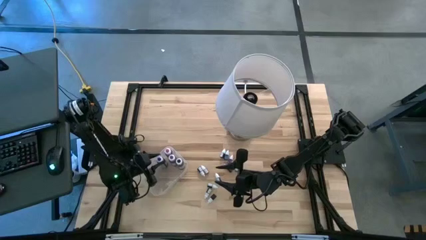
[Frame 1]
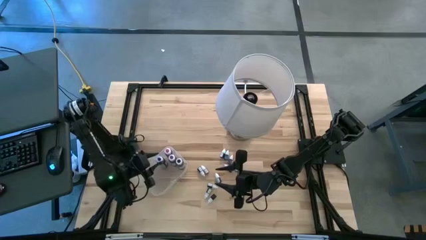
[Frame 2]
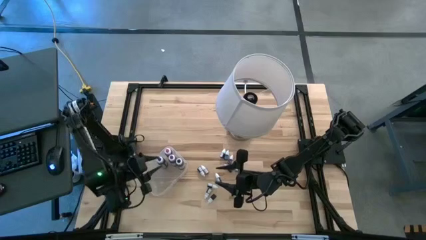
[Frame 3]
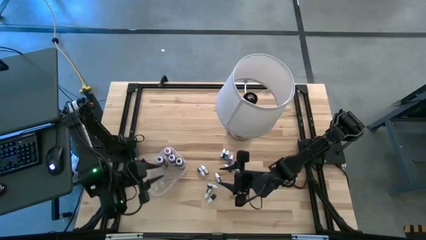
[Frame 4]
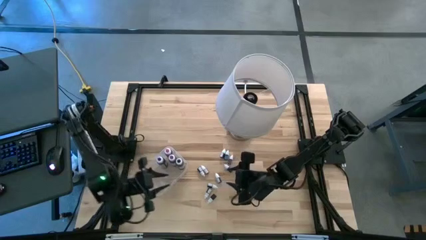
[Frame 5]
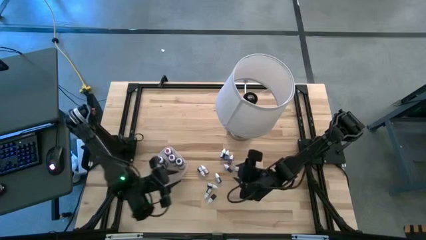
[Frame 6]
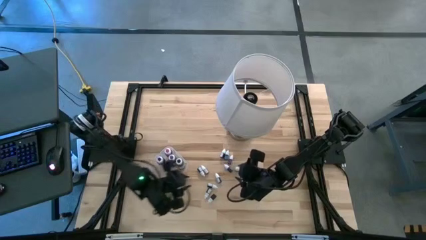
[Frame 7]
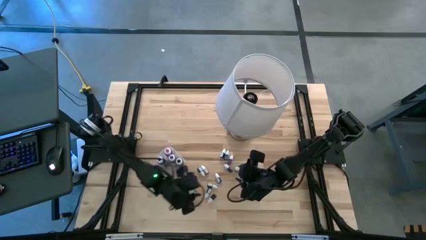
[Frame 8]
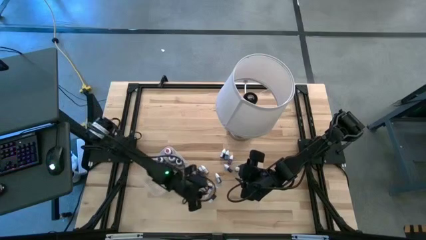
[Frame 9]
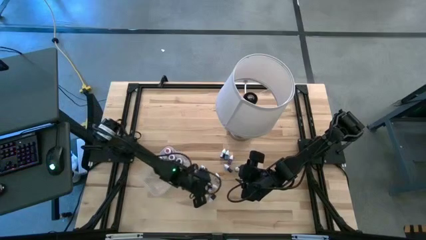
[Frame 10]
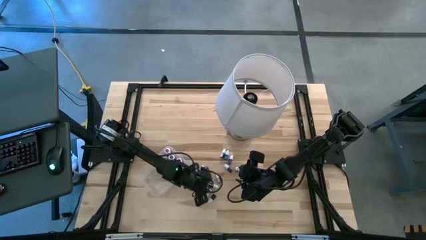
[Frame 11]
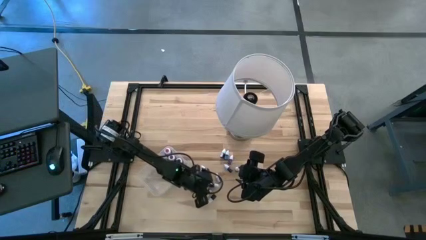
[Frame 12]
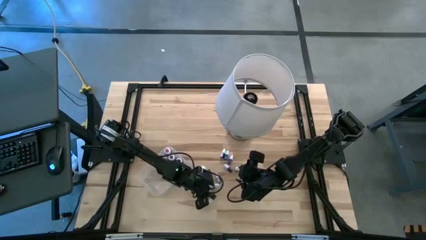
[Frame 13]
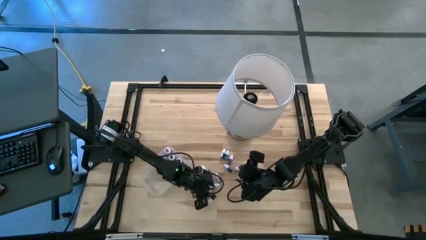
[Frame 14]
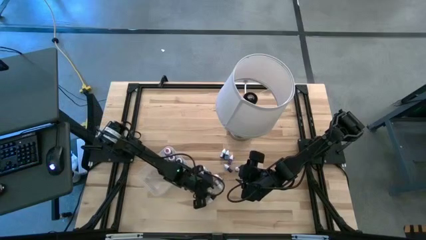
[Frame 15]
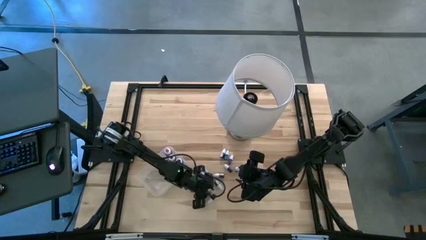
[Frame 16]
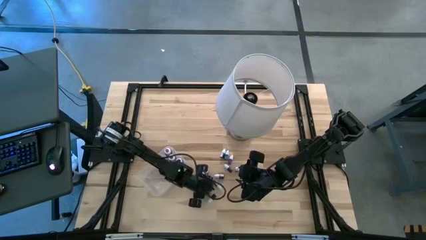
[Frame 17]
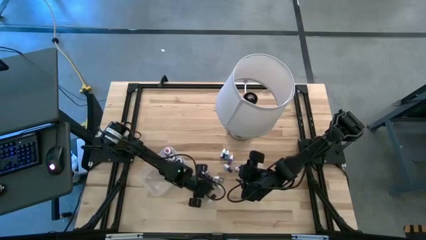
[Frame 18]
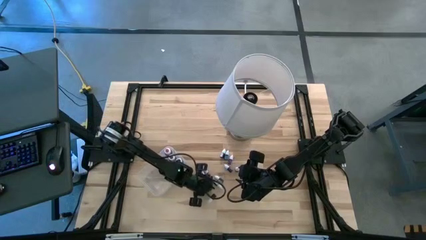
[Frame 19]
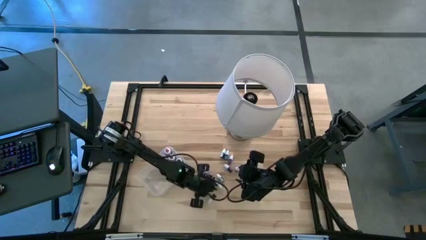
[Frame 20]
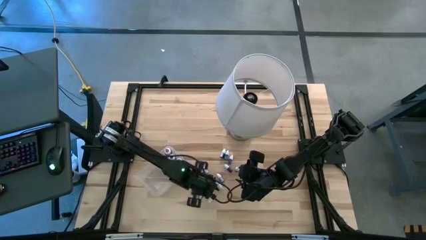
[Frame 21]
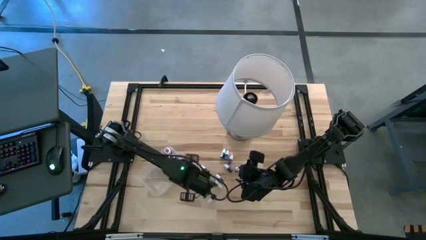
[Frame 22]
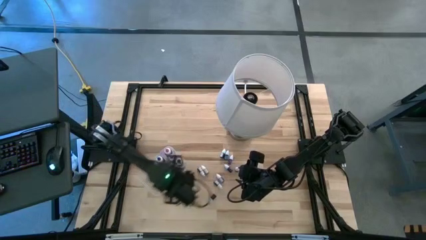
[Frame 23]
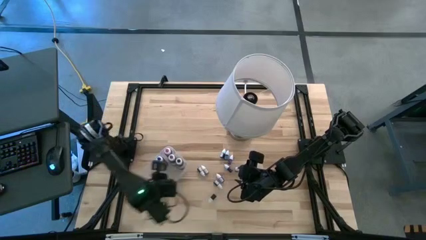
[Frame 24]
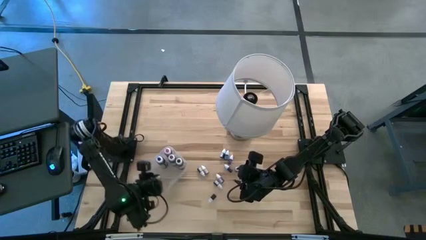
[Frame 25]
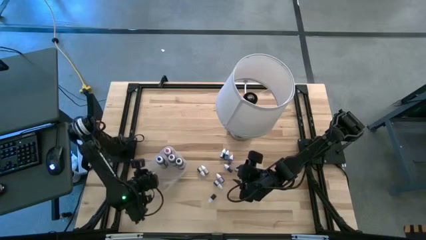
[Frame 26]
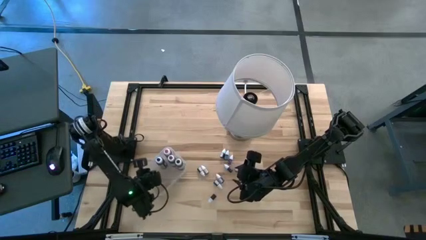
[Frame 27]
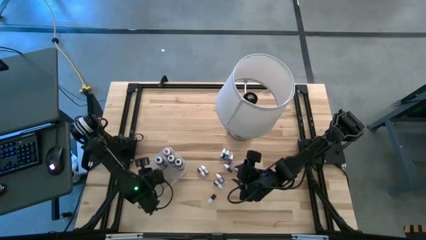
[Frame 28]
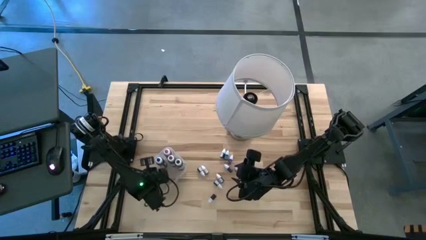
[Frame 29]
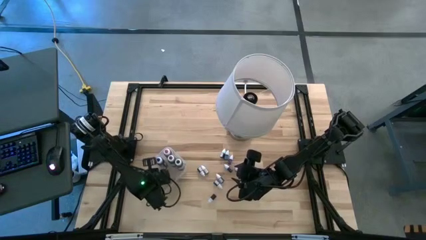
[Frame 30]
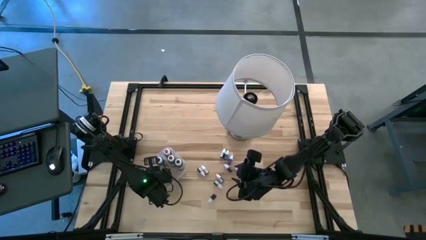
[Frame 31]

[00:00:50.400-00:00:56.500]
Task: Pick & Place food coloring
Put the green food coloring bottle into the transparent bin

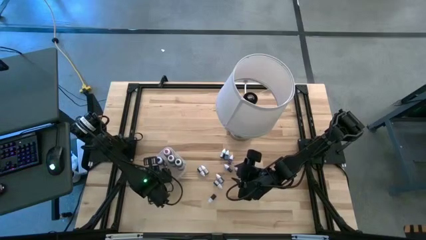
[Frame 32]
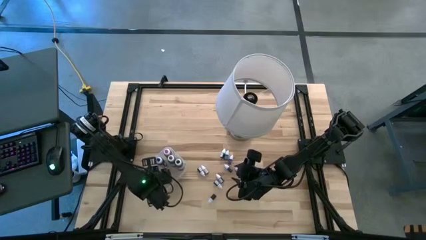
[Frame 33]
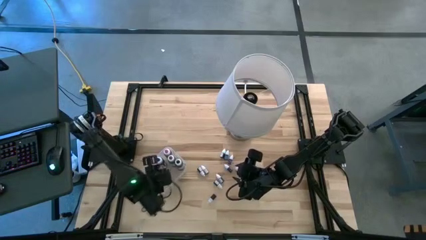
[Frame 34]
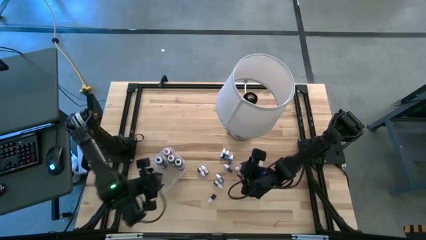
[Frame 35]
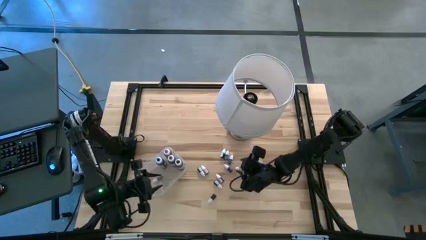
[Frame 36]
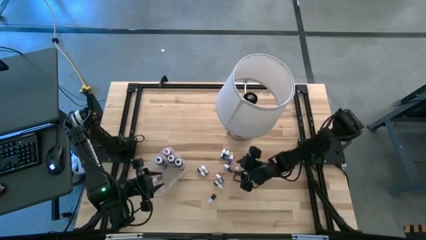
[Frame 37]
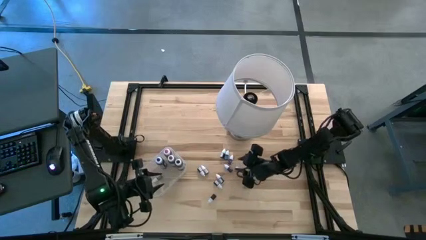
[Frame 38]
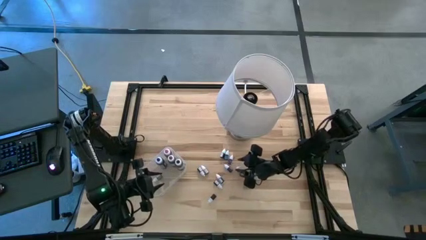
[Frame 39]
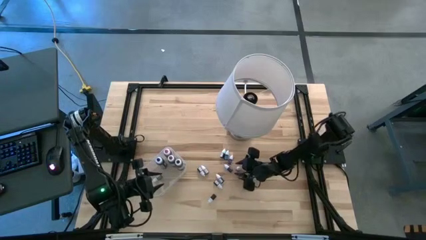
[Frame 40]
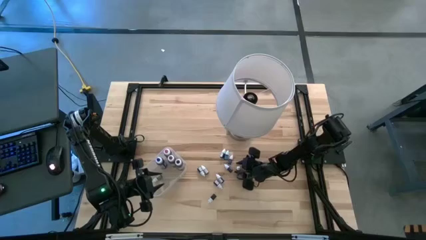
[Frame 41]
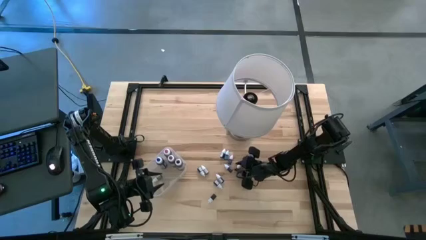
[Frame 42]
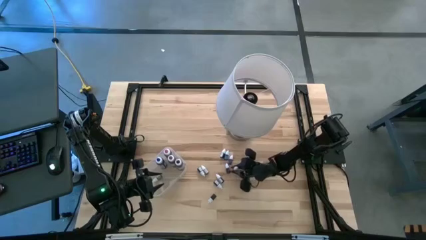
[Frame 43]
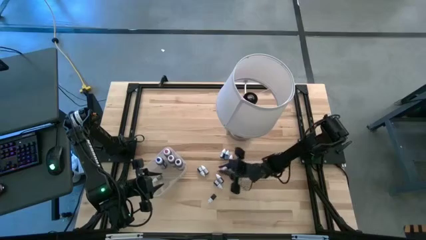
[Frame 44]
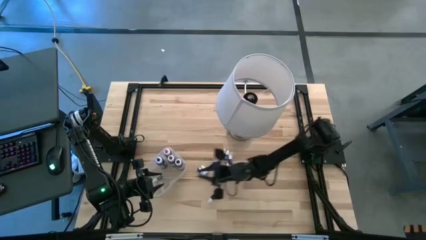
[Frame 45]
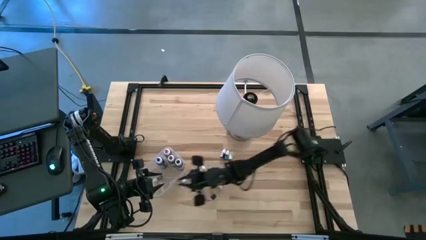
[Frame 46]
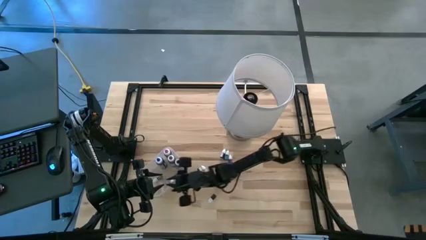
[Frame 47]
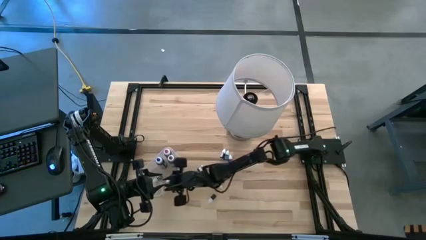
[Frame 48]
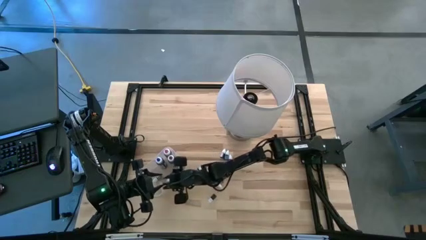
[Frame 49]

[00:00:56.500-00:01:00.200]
Put the red food coloring bottle into the transparent bin

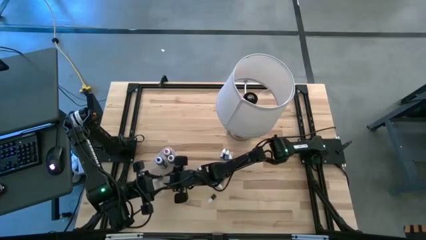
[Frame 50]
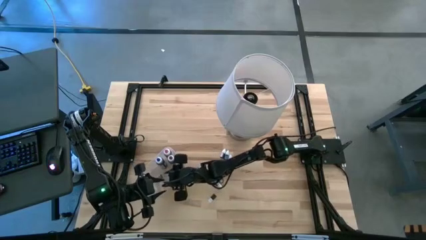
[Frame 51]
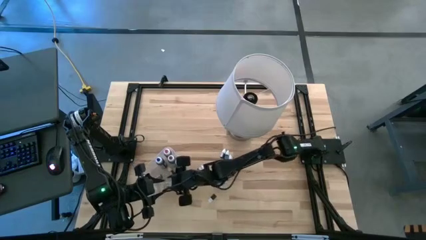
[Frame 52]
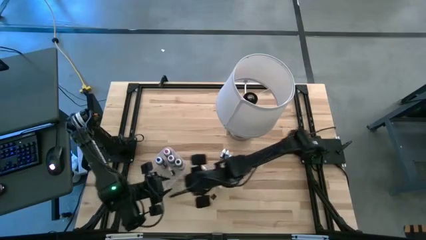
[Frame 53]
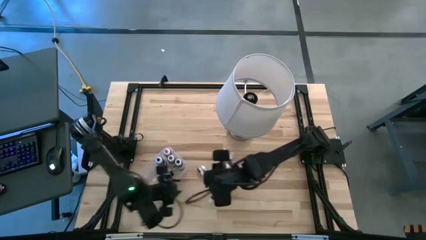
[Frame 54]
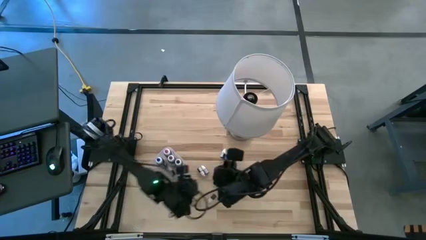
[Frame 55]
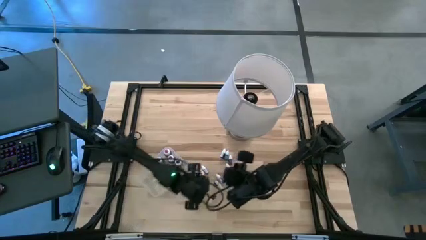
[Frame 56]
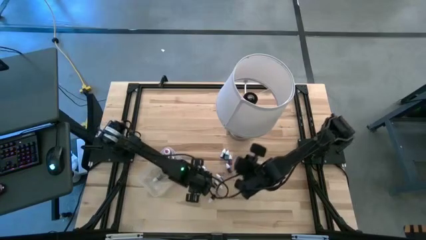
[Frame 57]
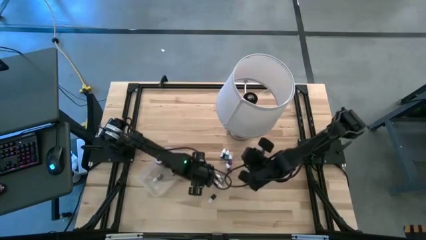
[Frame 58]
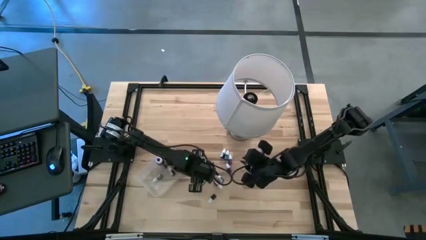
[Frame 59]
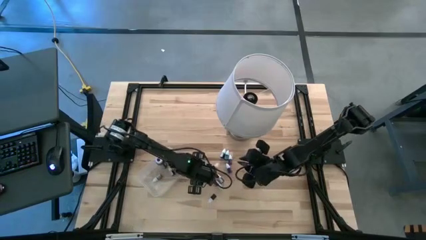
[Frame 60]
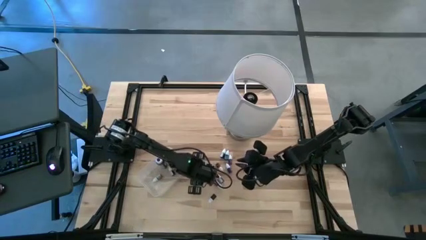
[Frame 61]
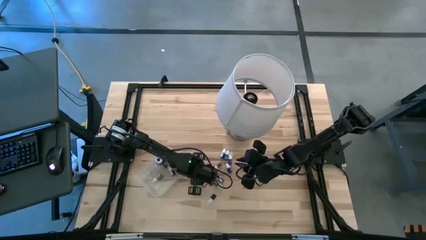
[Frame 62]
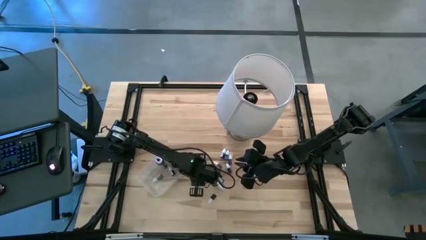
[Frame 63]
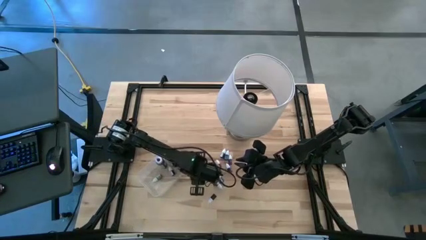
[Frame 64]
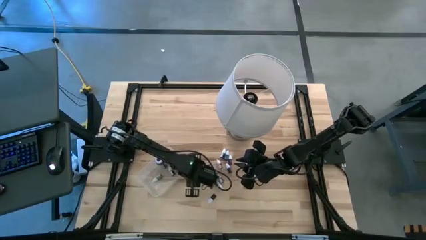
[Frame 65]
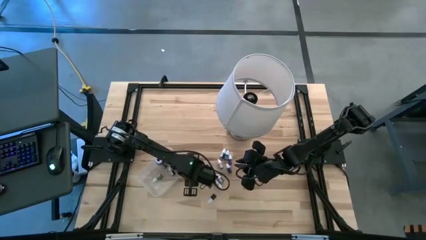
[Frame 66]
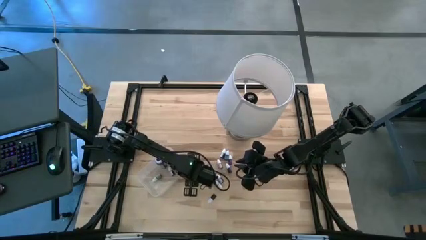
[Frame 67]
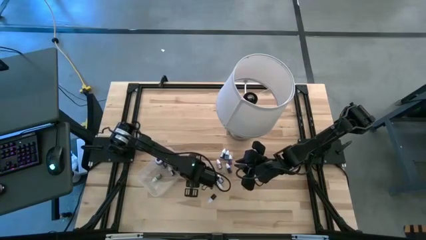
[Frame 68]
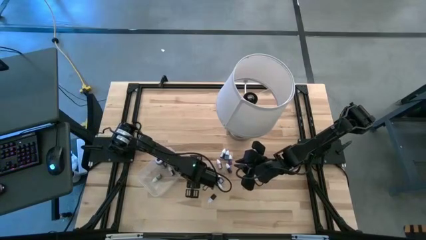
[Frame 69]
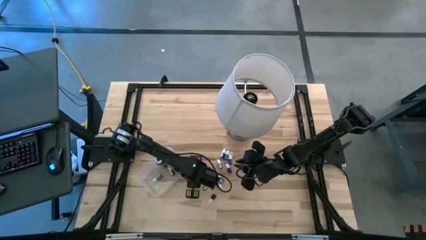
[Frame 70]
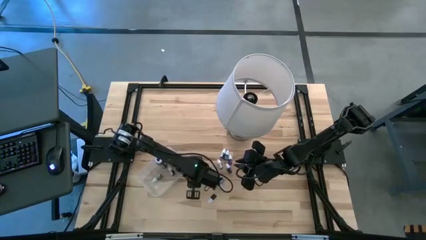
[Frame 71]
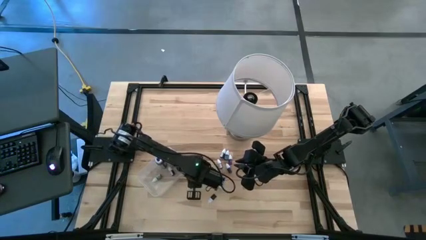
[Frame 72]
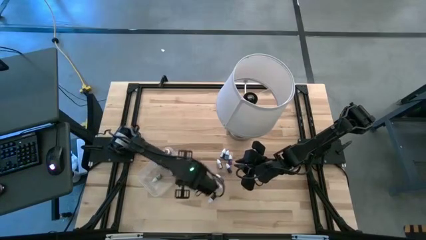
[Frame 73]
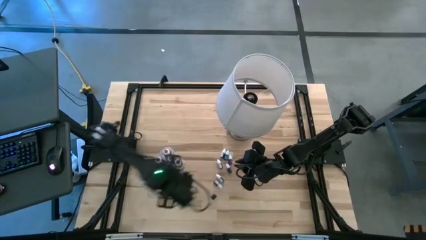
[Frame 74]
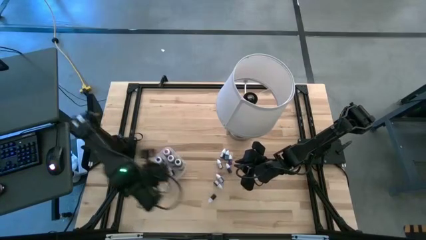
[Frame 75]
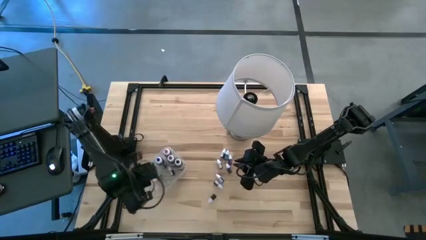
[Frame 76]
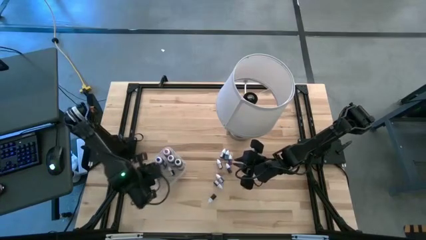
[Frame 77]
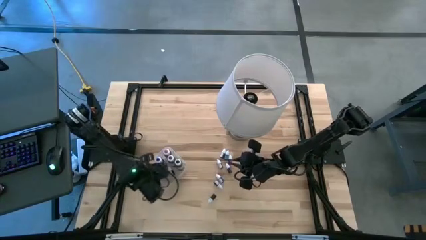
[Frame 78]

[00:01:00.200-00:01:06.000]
Put the green food coloring bottle into the transparent bin

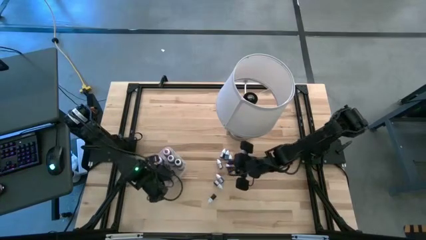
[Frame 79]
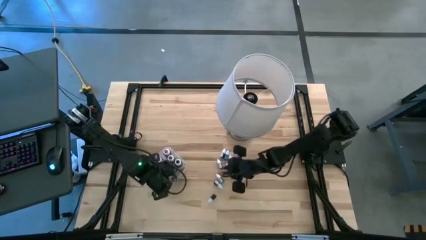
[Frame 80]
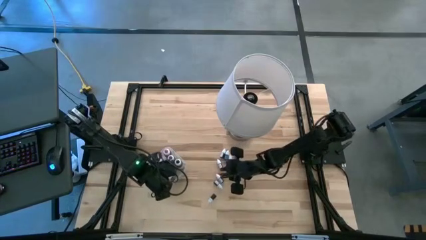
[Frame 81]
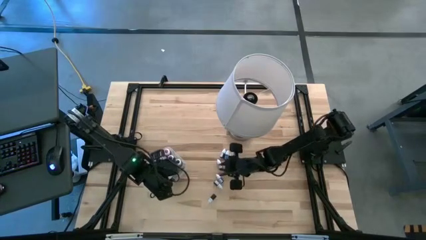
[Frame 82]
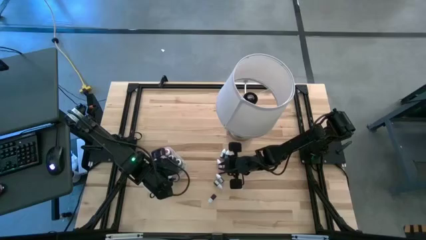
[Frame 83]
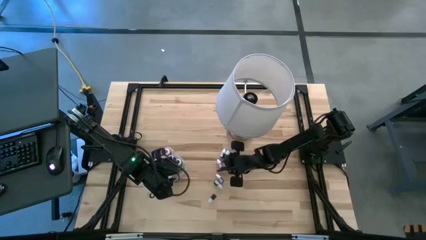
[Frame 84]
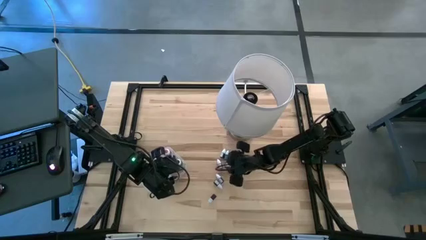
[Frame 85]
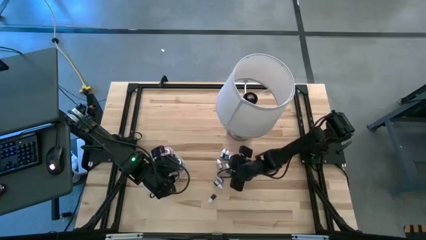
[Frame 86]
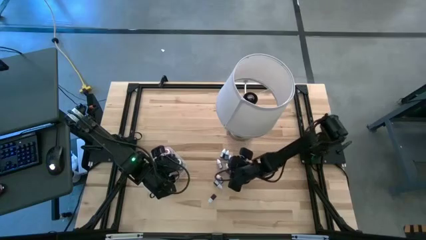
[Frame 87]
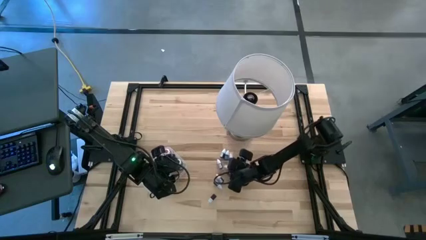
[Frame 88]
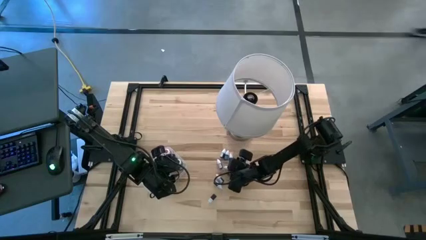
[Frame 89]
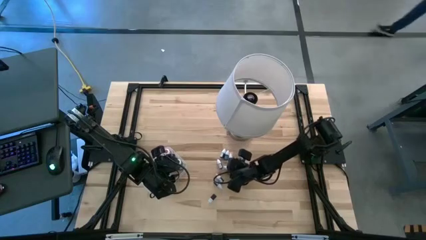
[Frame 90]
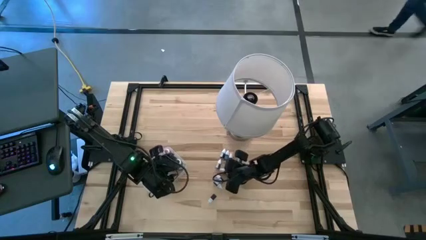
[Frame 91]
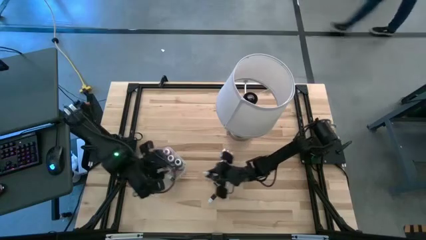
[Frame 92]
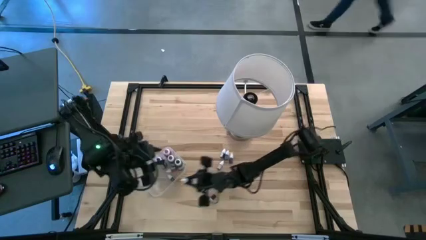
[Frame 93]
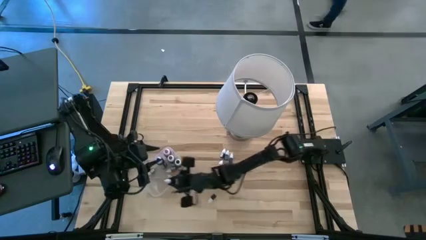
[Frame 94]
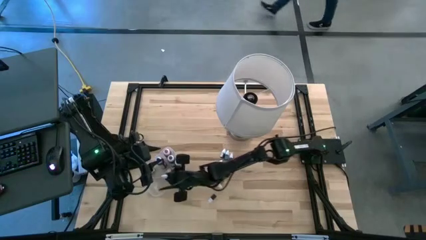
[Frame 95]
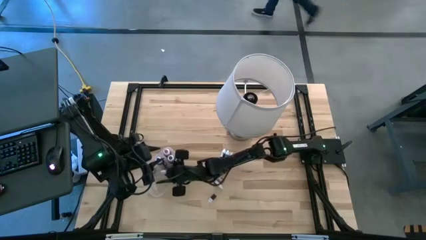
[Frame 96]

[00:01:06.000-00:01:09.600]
Put the violet food coloring bottle into the transparent bin
